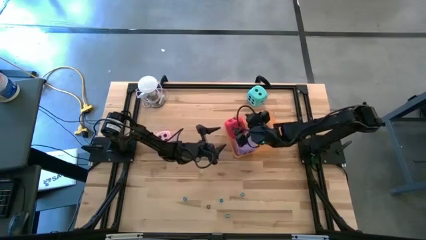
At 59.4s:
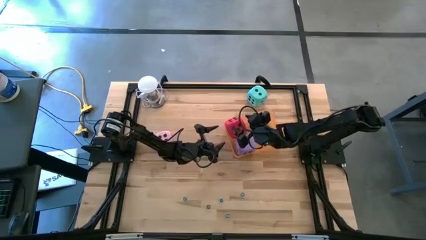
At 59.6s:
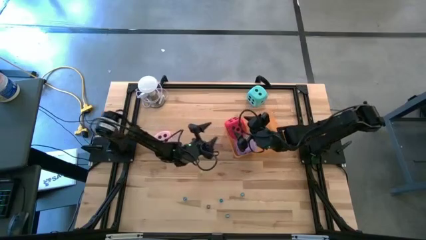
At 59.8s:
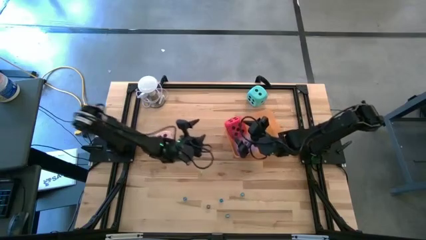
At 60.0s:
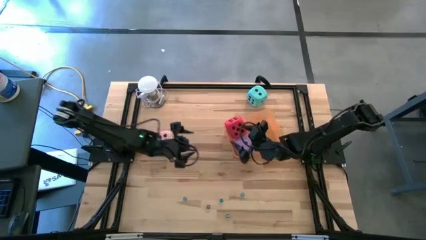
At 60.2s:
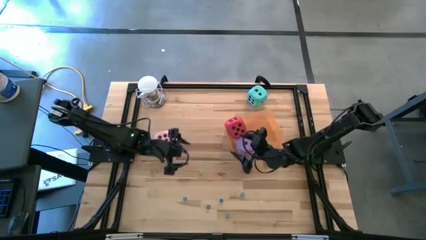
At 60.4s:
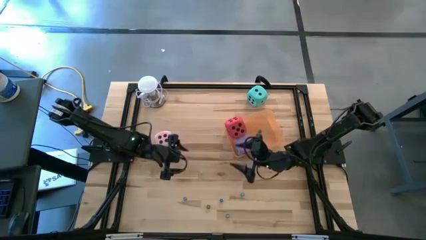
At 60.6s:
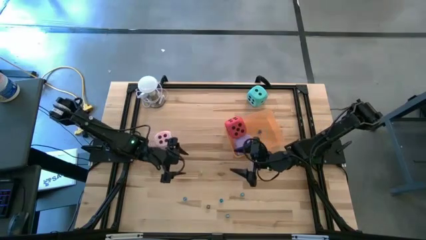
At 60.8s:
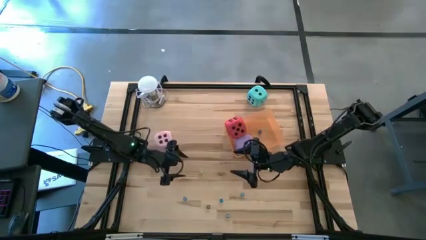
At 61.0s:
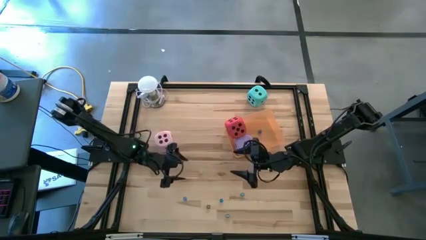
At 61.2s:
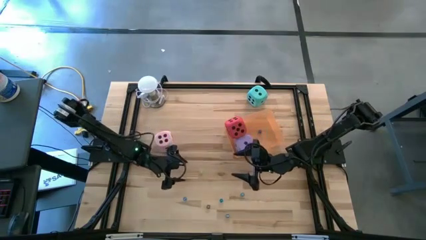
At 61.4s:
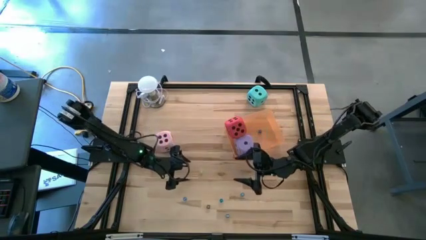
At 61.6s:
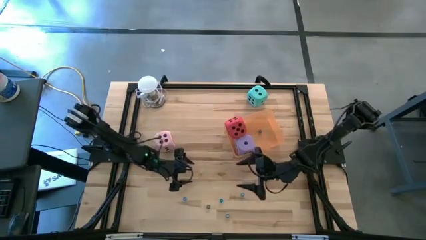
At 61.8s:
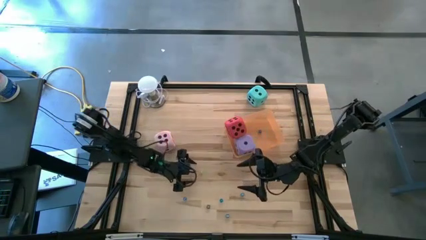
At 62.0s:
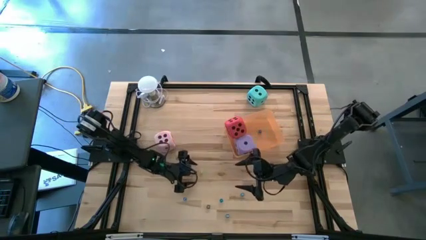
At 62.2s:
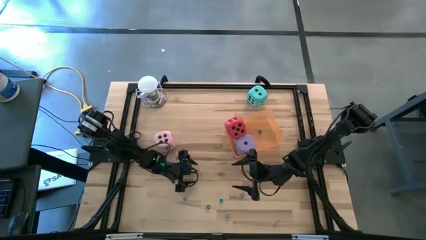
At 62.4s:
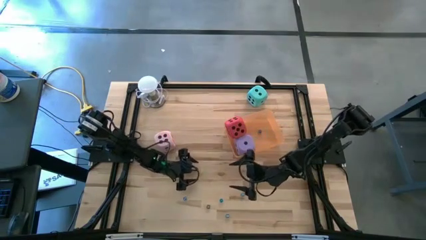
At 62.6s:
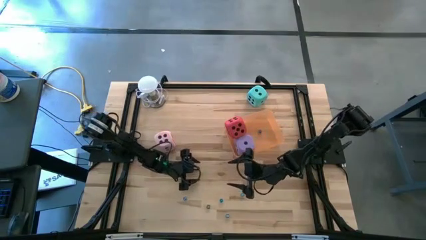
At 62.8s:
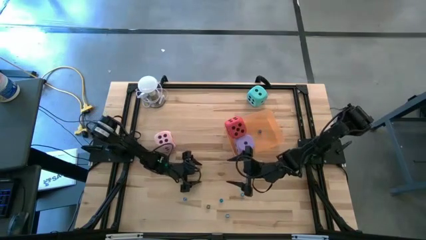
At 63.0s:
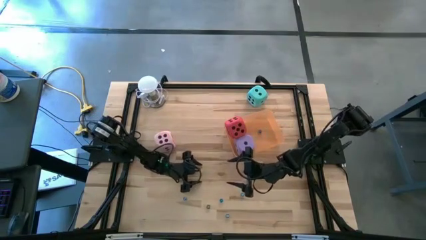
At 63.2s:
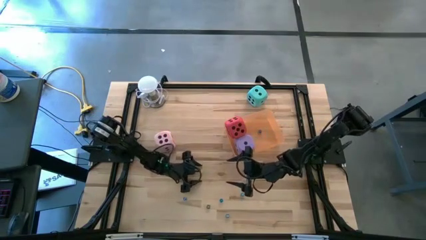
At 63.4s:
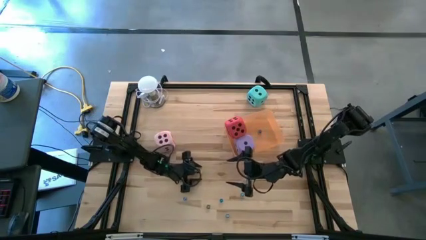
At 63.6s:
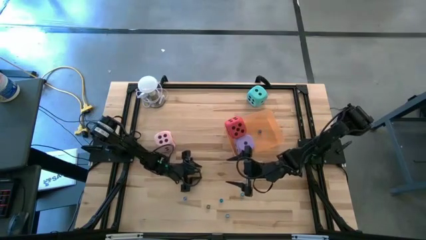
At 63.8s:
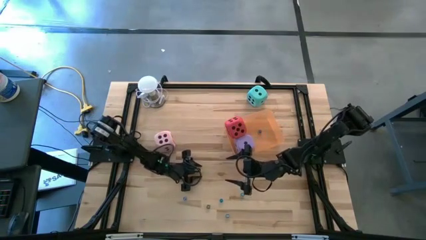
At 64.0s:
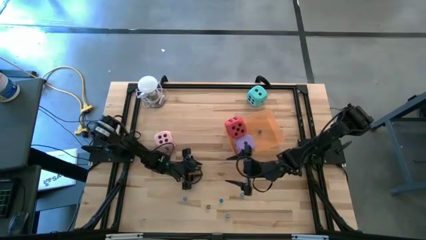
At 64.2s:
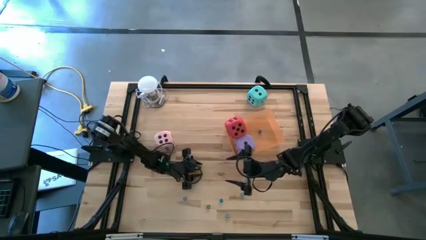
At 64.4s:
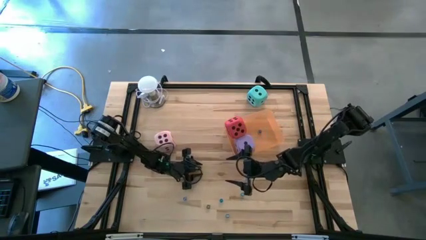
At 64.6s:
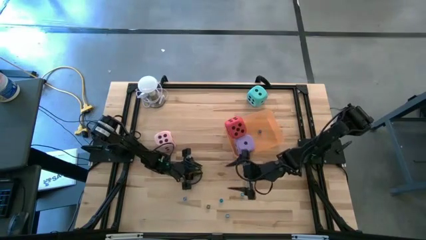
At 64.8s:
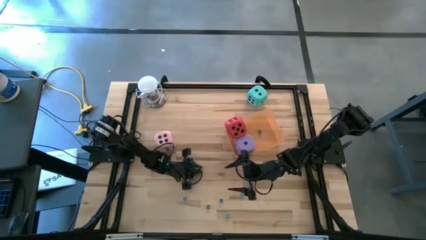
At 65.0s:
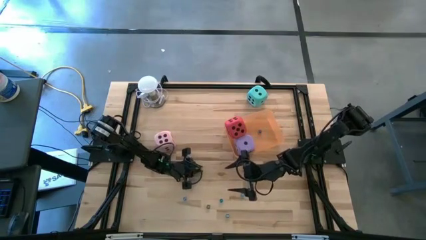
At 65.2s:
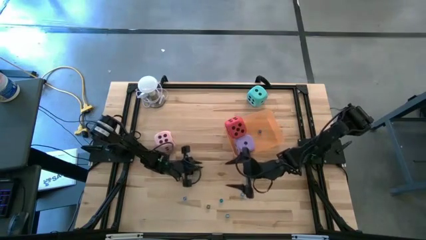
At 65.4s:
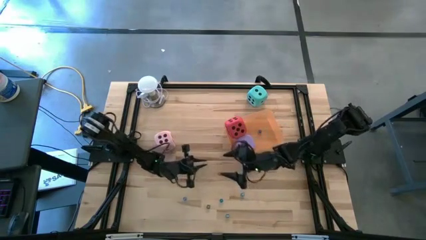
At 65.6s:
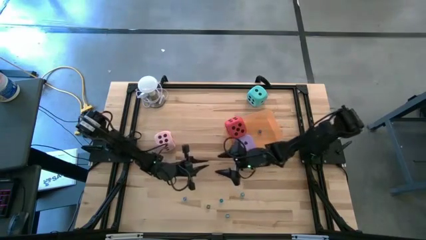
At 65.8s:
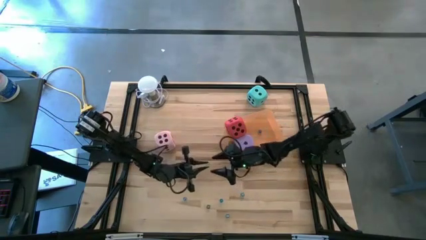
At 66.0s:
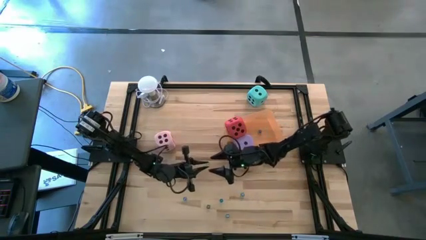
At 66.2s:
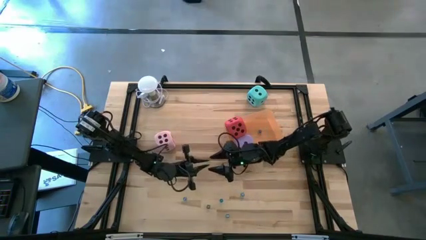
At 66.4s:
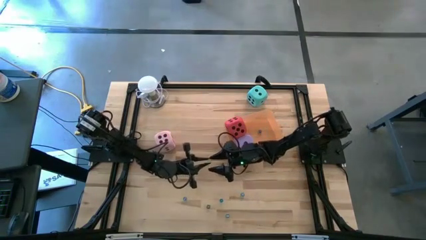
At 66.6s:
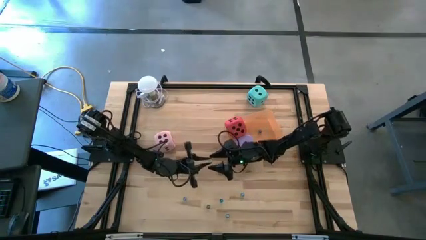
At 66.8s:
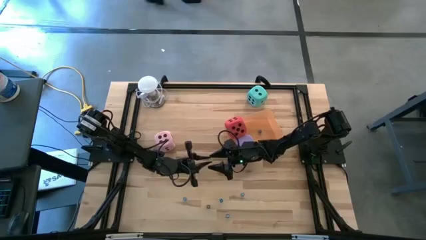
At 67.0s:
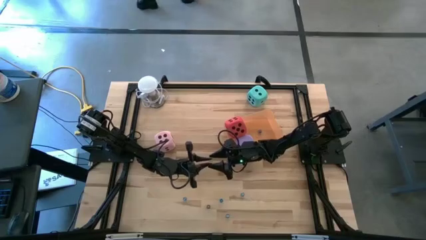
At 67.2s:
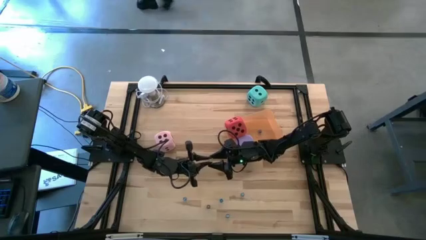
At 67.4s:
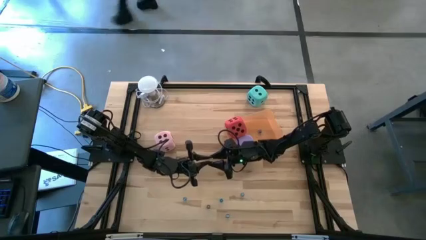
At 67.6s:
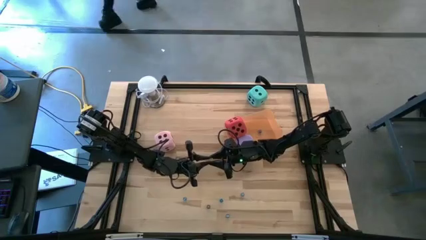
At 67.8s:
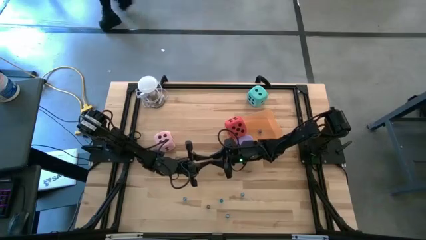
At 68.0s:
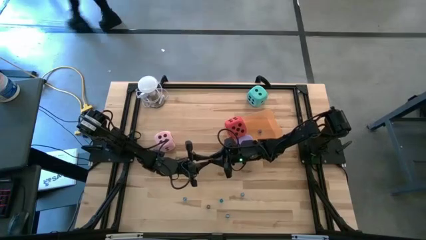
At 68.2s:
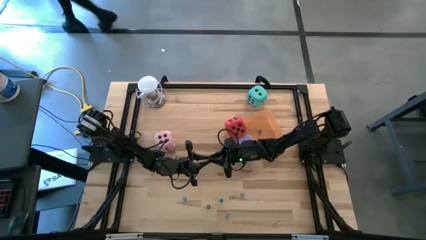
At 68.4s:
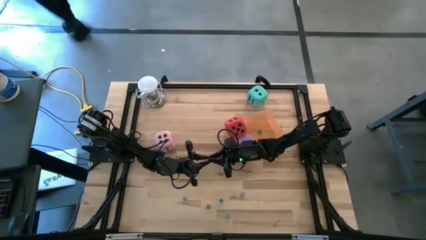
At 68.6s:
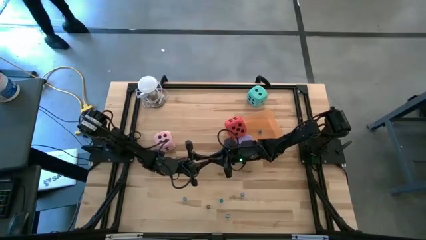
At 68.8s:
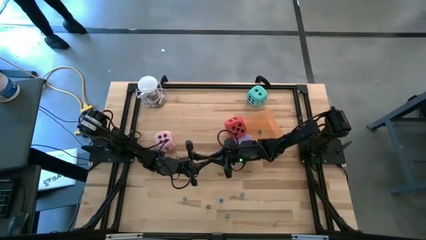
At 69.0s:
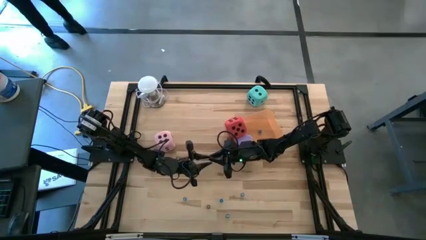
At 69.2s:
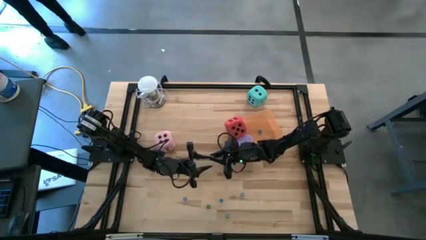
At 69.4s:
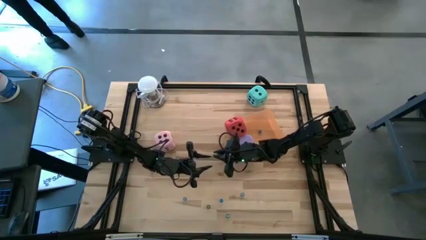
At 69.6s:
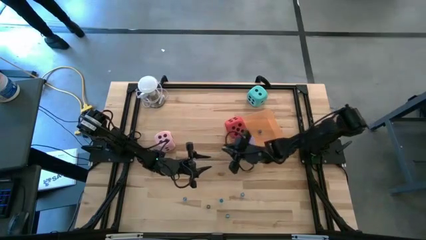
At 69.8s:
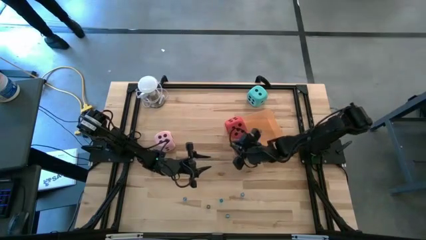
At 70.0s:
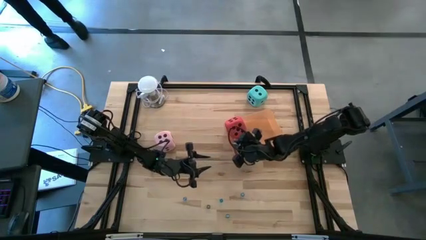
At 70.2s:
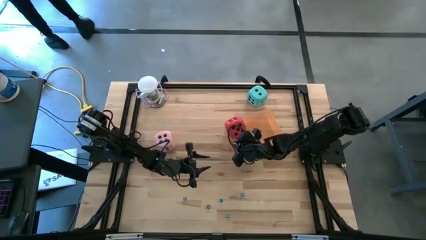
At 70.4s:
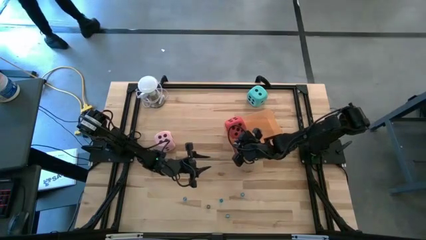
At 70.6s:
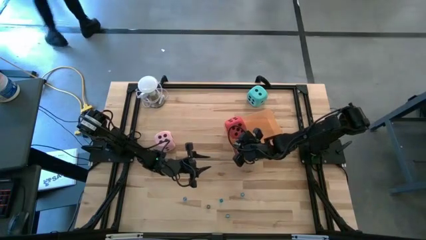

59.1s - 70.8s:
Task: Pick & Place Dice
Put the small green dice into the orange bin

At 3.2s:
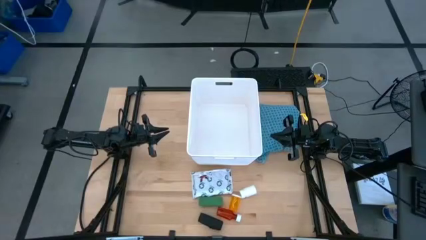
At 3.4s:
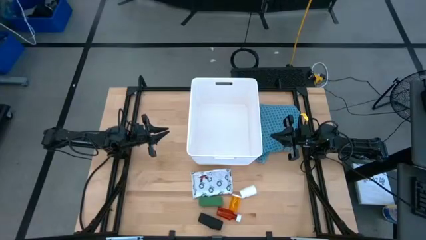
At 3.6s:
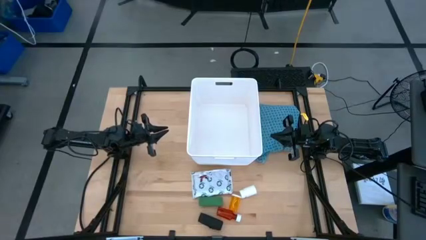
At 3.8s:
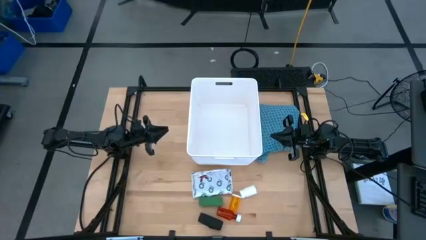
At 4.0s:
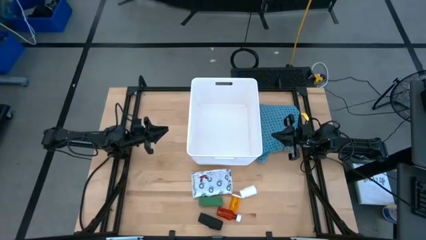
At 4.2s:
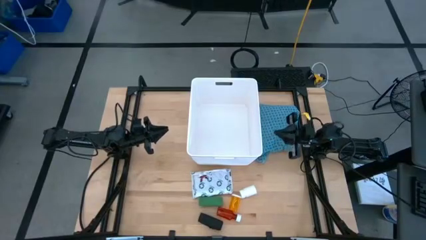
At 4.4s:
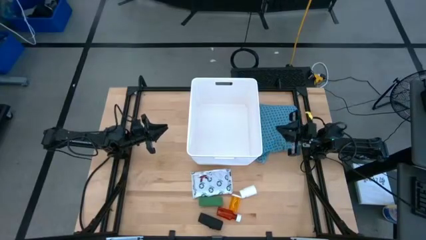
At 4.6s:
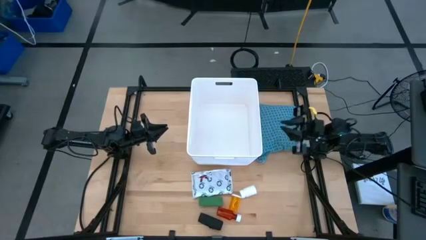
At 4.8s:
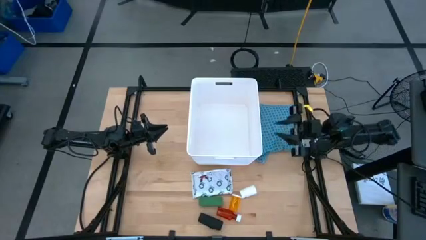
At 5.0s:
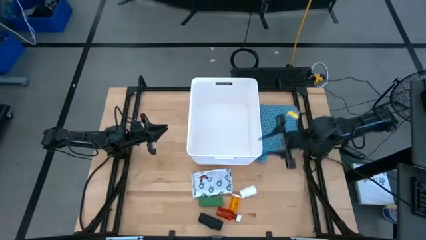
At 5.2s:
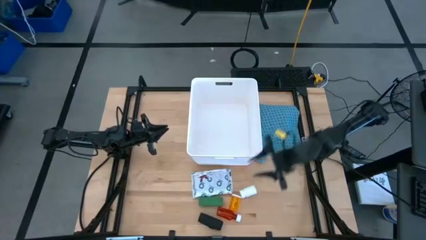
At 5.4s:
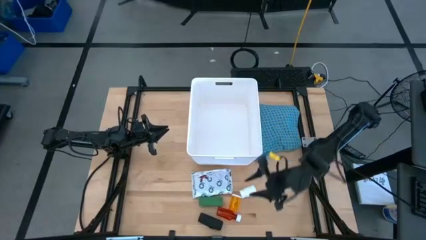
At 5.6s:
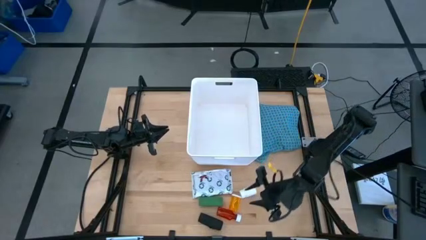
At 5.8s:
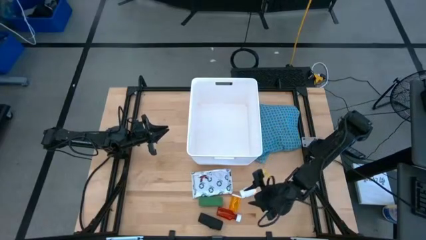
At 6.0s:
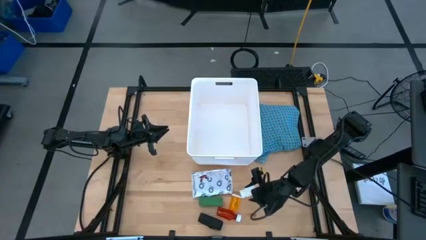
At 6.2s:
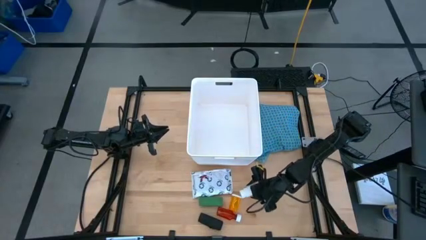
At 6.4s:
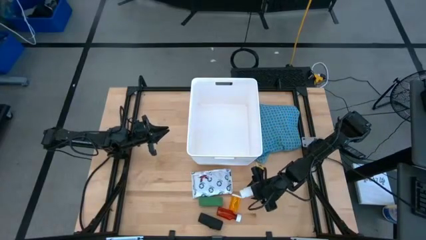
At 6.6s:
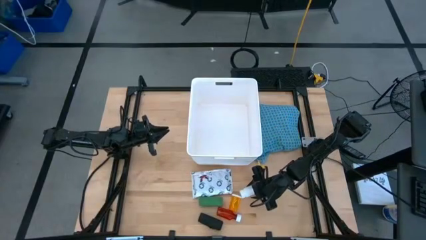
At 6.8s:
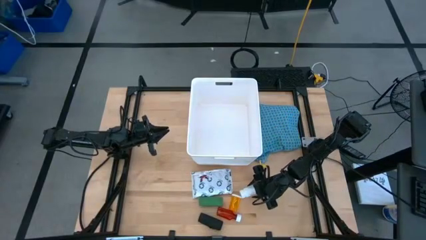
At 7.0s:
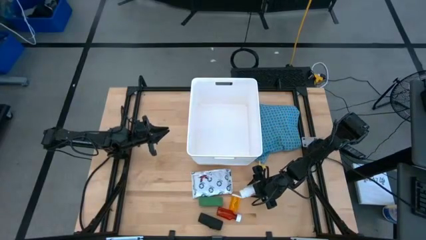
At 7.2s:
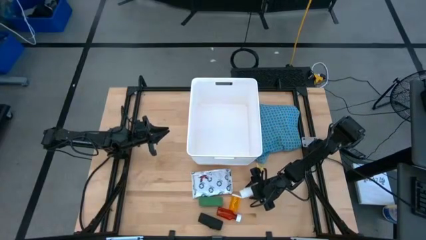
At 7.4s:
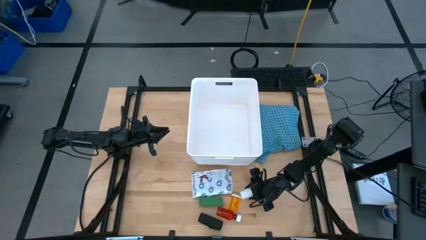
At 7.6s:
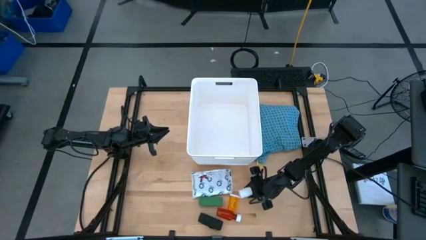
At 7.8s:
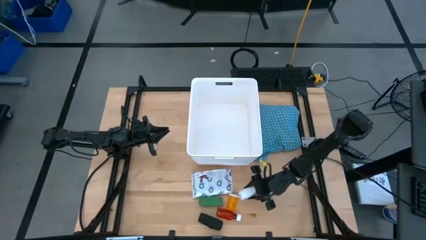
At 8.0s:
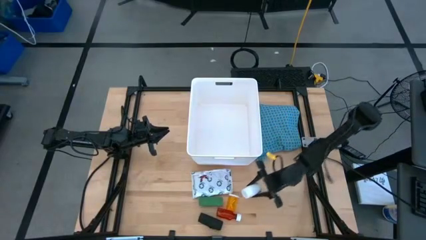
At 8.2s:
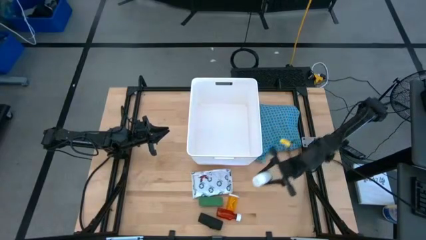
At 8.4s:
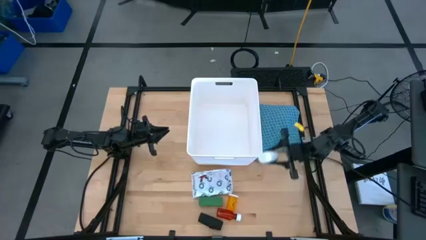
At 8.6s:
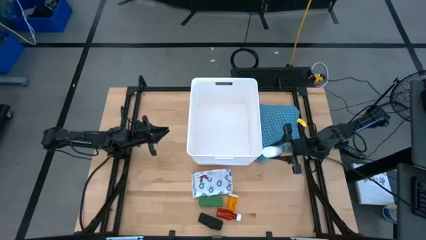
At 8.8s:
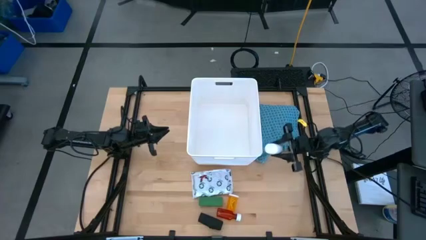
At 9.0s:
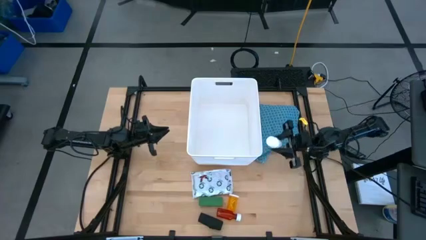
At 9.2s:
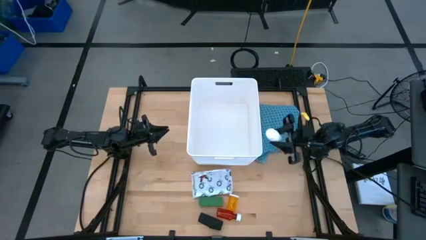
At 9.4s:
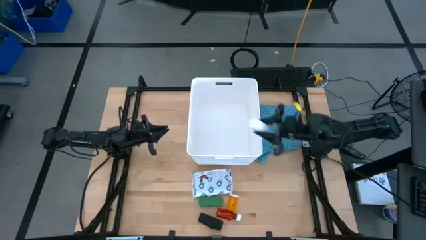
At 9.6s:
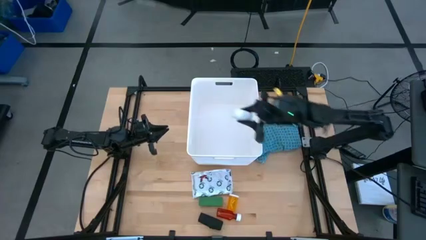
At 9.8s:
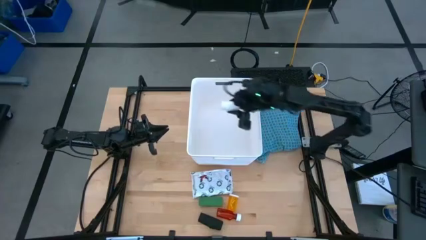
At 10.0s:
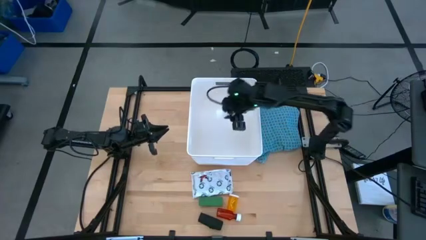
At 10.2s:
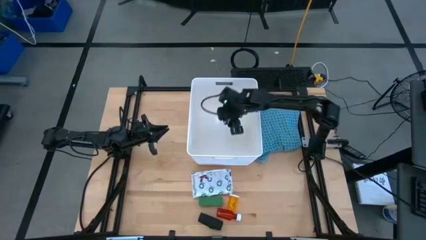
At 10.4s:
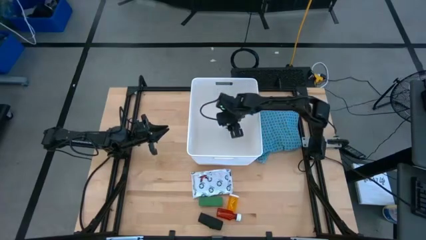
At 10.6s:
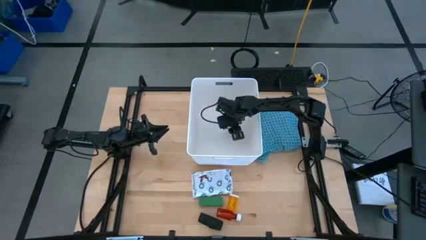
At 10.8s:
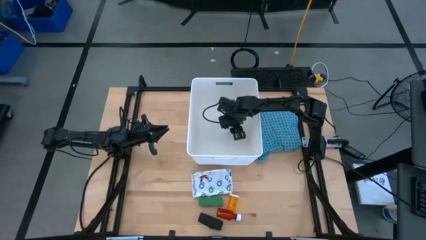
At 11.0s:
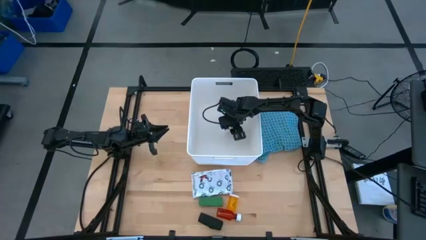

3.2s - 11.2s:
Task: Pick & place medical supplies in basket/bin
Put the white pill bottle into the white bin
